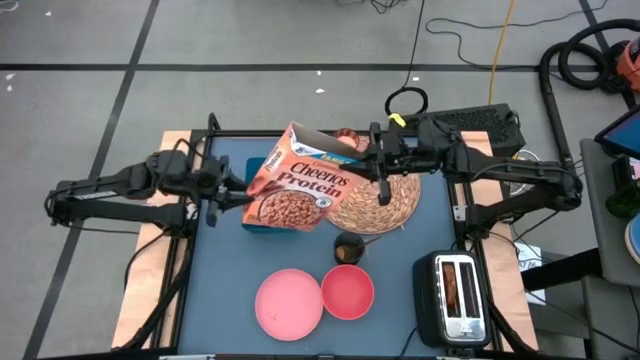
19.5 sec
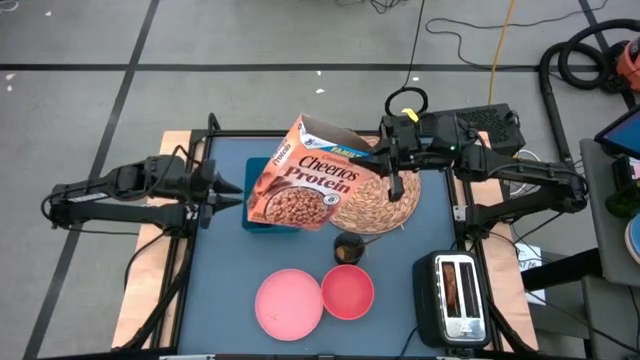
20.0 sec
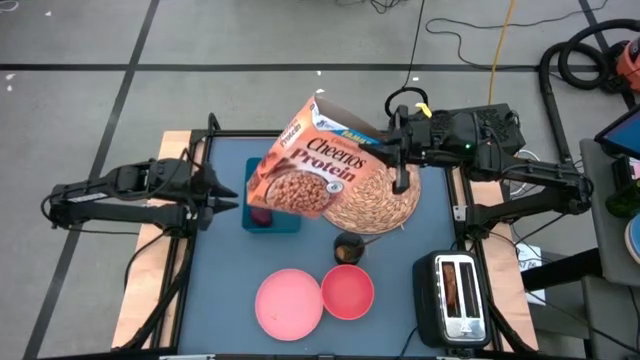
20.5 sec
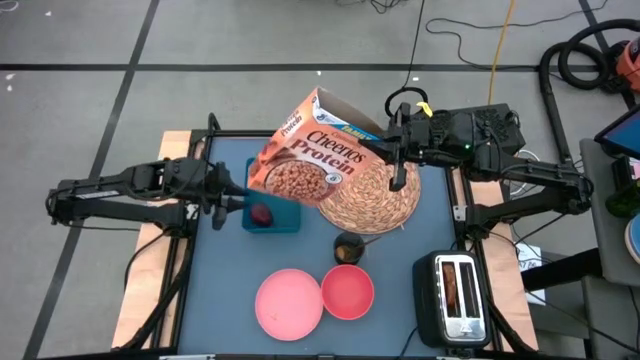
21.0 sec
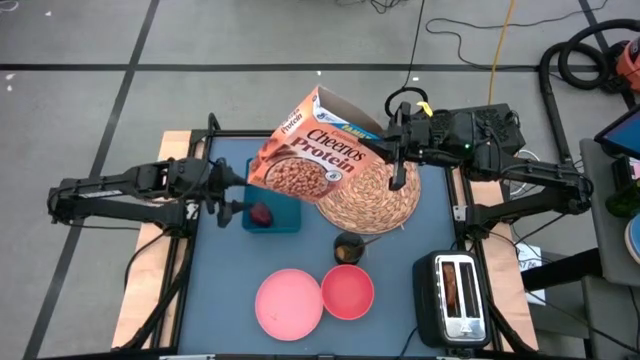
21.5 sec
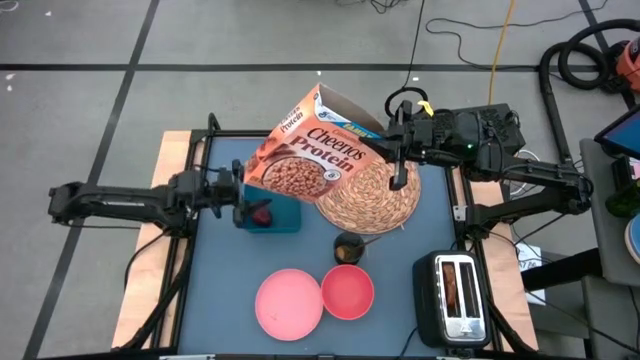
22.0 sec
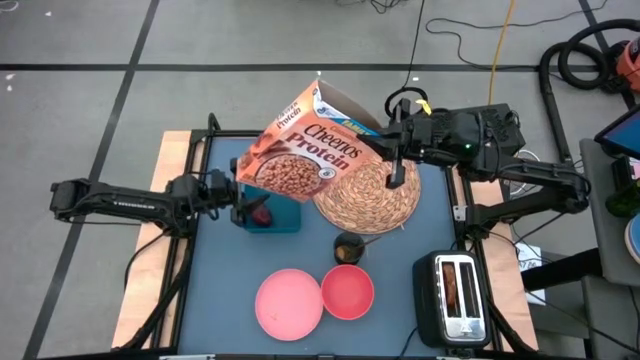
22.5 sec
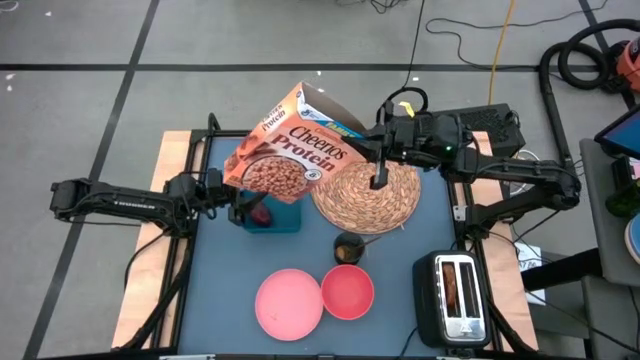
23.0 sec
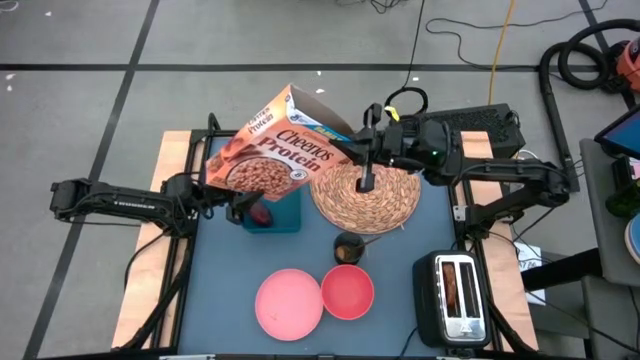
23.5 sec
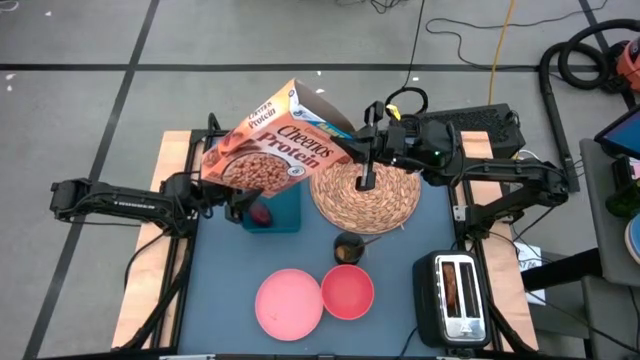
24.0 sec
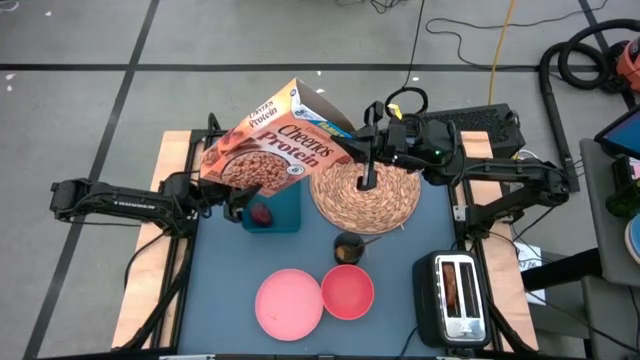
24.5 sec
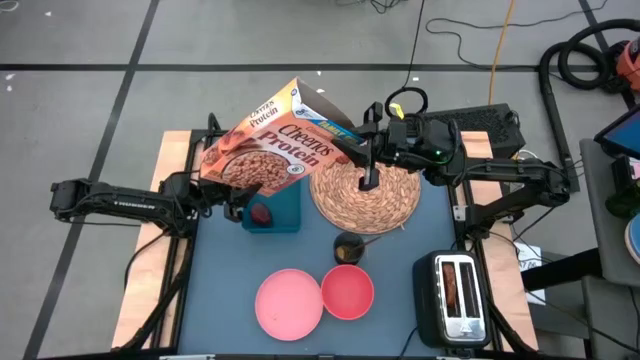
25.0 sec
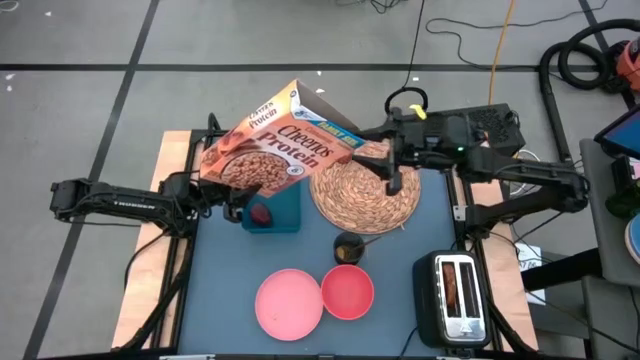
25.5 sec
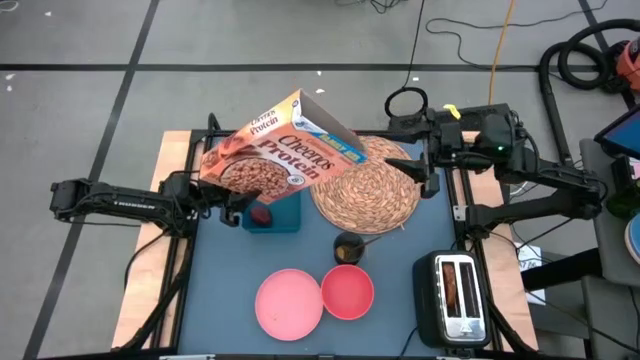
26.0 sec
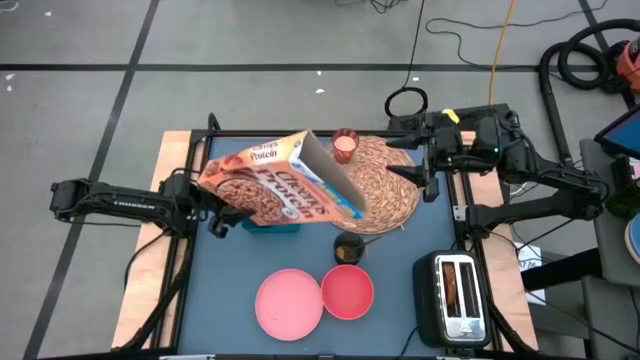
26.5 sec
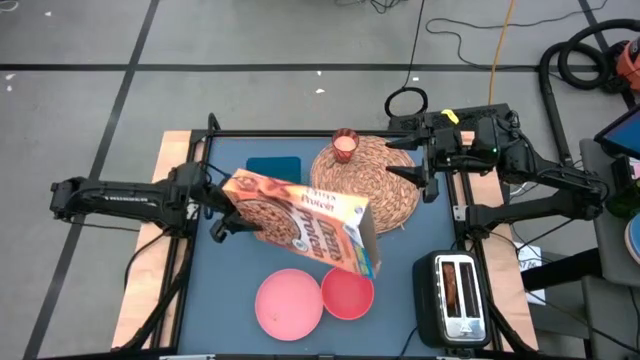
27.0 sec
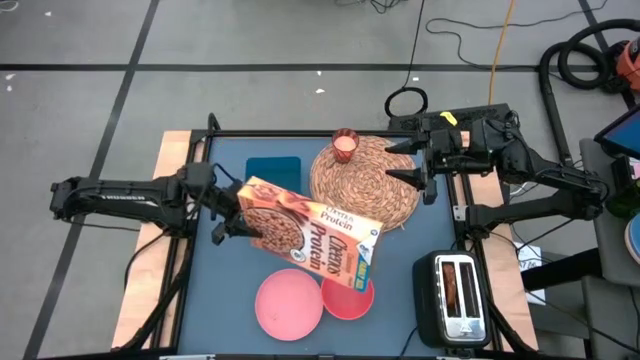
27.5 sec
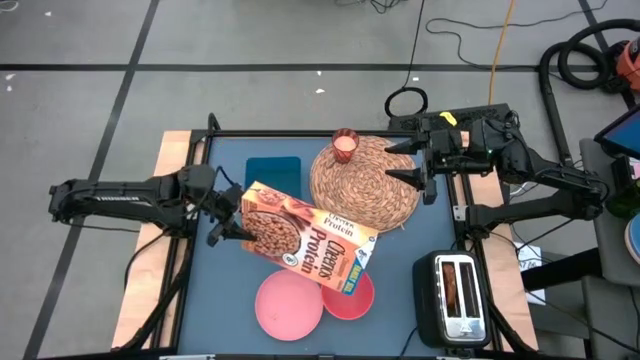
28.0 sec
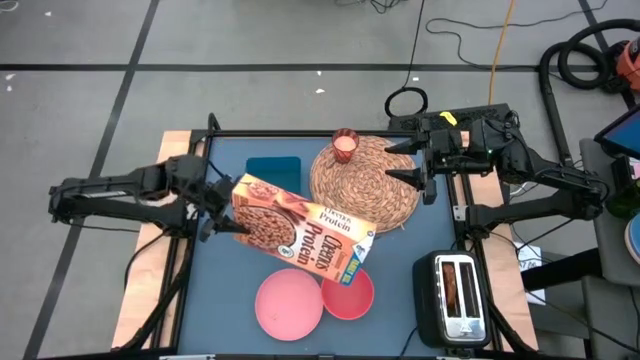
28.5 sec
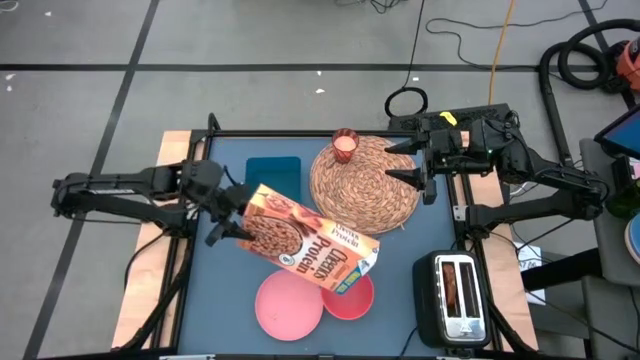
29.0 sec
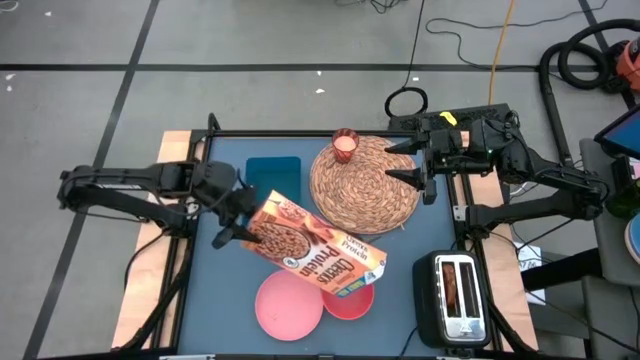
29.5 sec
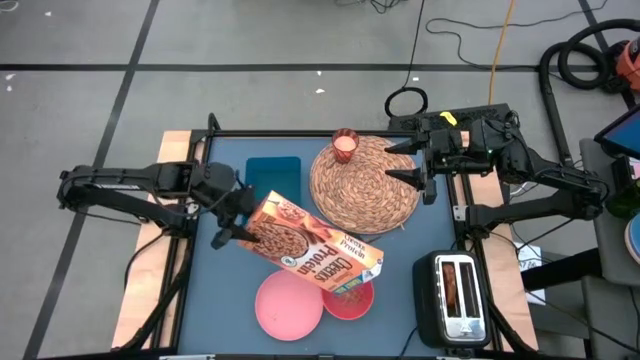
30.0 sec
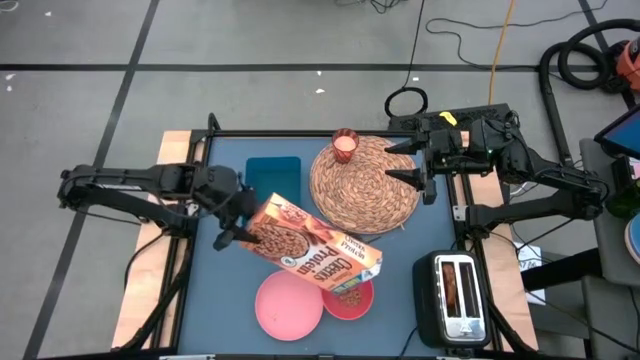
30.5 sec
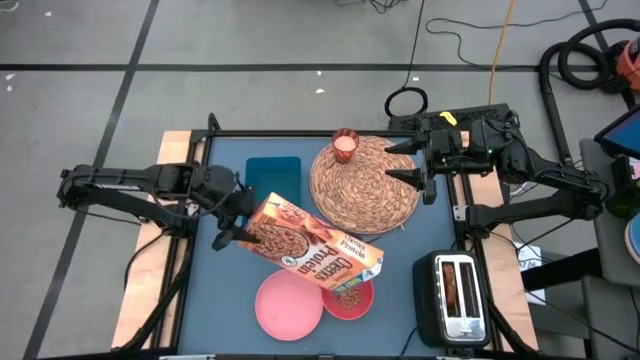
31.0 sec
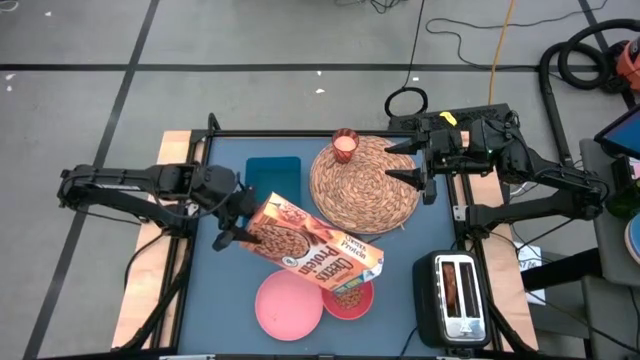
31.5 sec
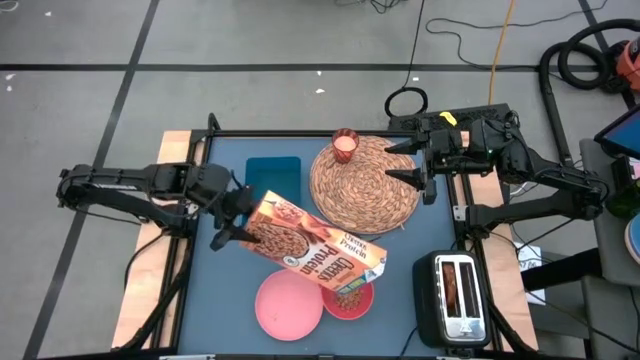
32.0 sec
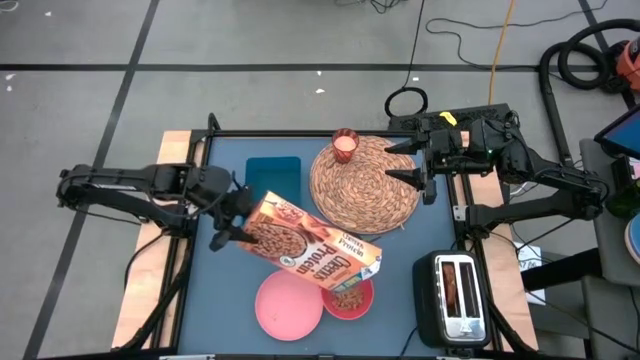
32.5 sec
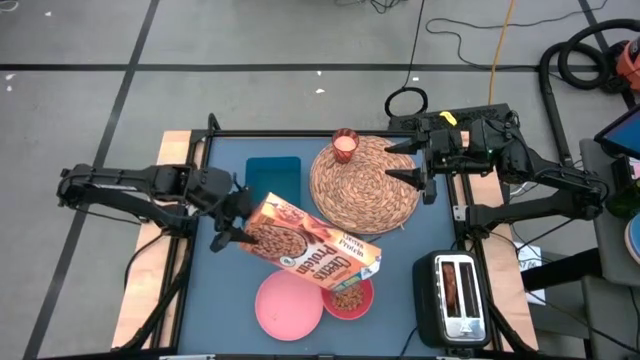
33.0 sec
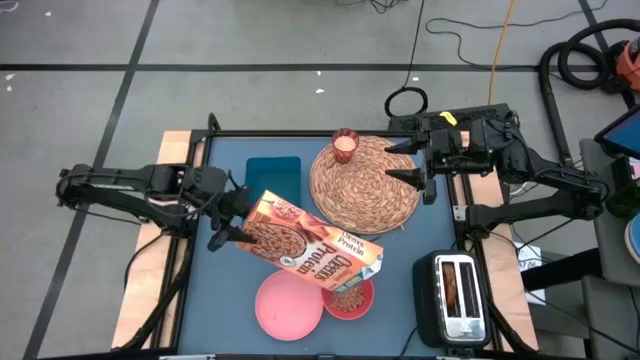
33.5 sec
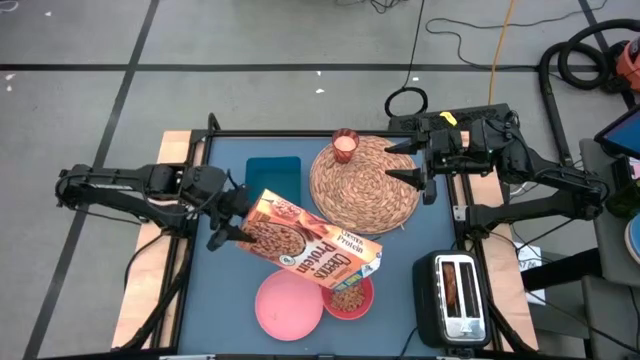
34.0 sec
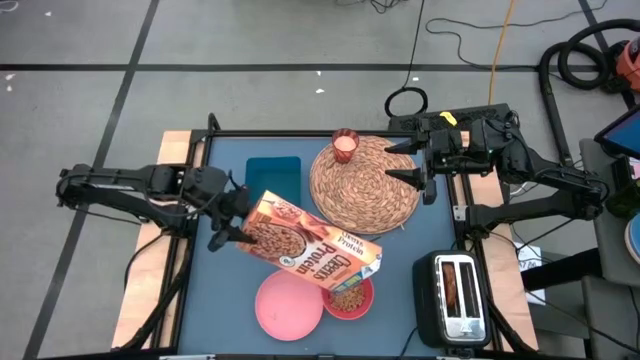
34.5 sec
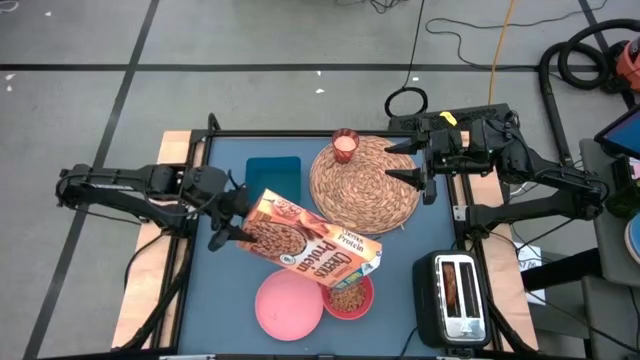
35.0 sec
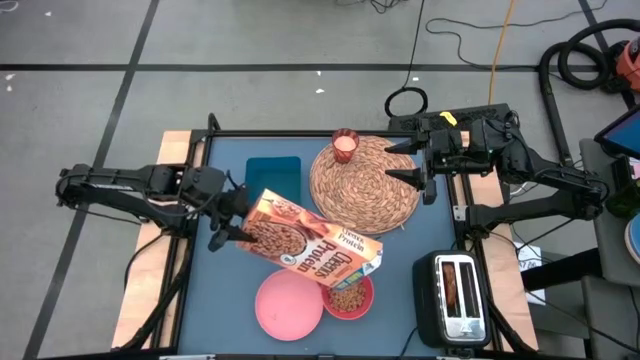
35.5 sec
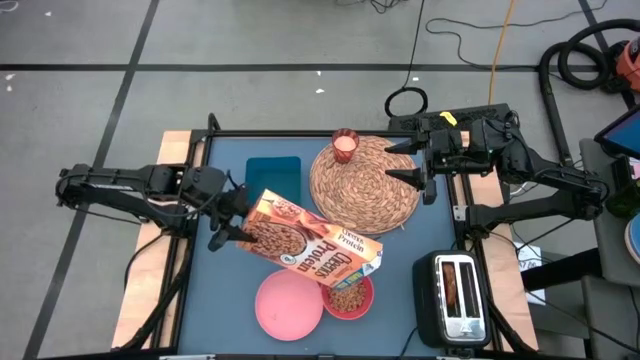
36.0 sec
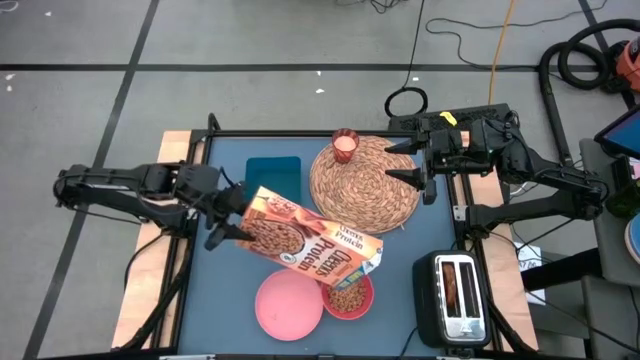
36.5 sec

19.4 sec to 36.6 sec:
Task: Arrange a breakfast setting
Pour the cereal into the pink bowl
